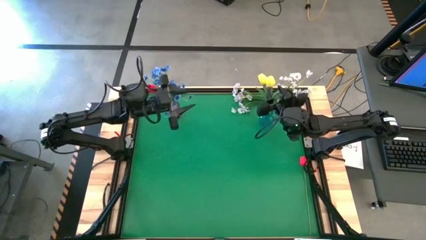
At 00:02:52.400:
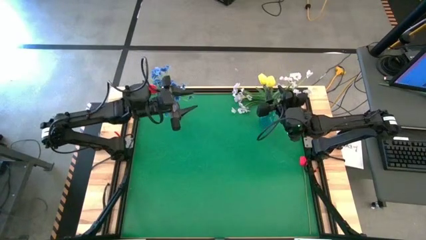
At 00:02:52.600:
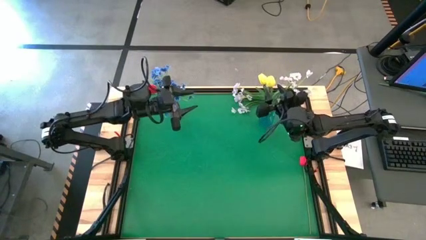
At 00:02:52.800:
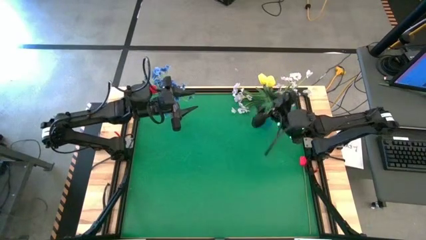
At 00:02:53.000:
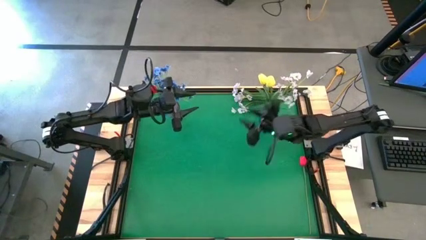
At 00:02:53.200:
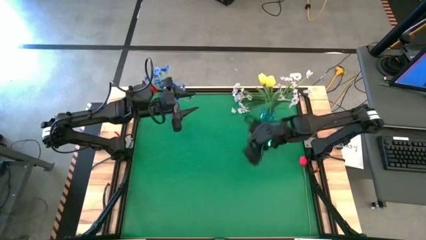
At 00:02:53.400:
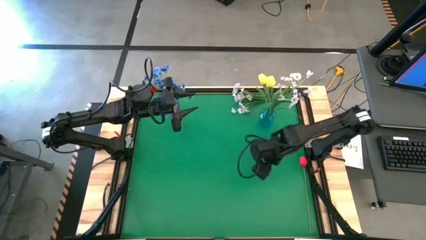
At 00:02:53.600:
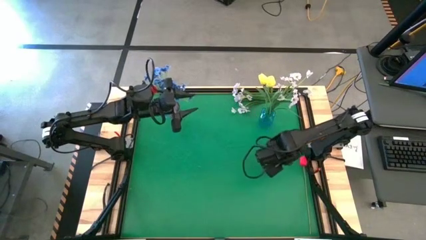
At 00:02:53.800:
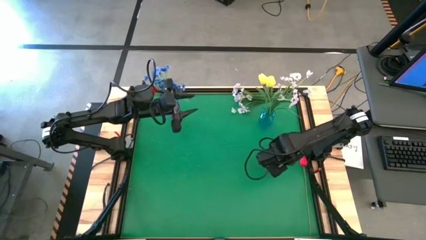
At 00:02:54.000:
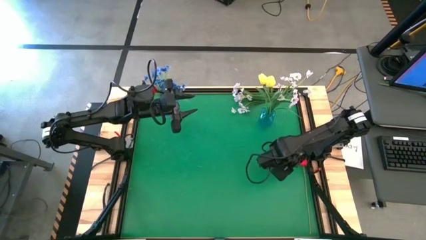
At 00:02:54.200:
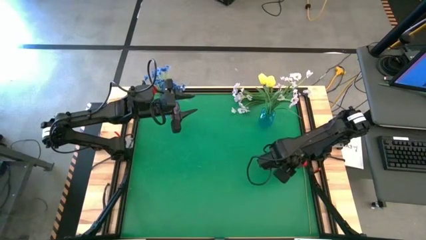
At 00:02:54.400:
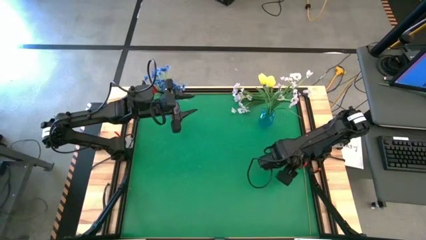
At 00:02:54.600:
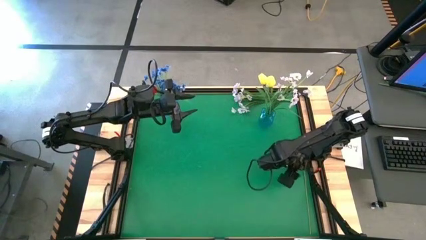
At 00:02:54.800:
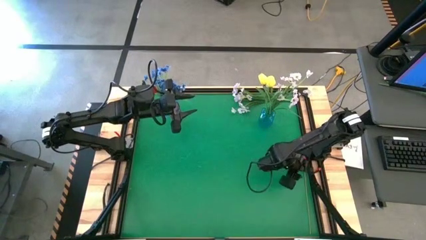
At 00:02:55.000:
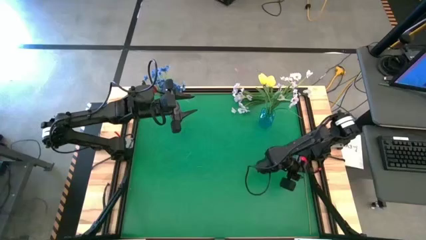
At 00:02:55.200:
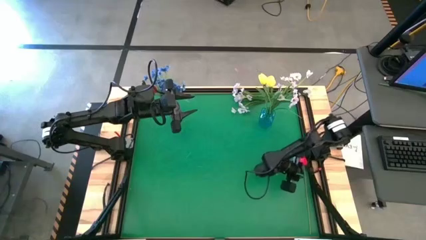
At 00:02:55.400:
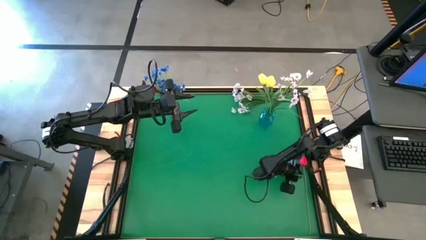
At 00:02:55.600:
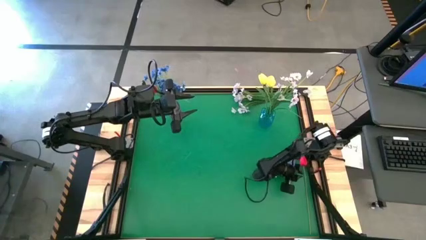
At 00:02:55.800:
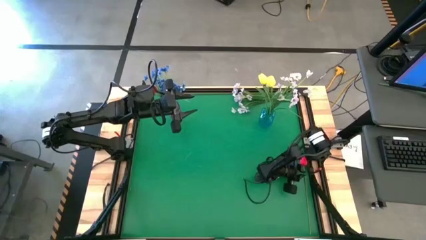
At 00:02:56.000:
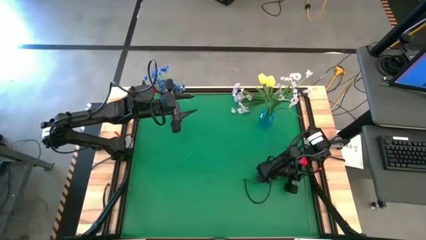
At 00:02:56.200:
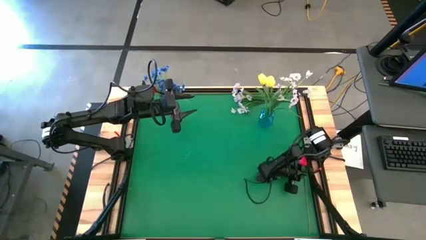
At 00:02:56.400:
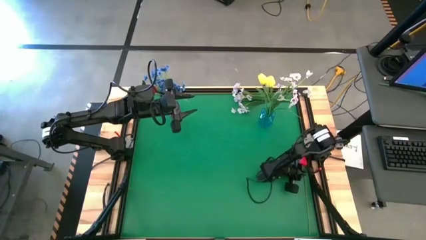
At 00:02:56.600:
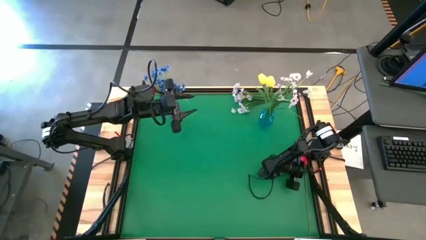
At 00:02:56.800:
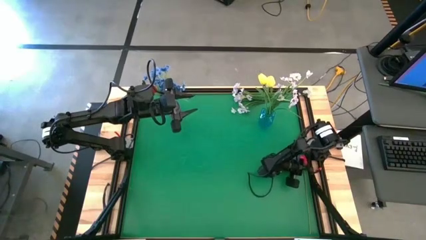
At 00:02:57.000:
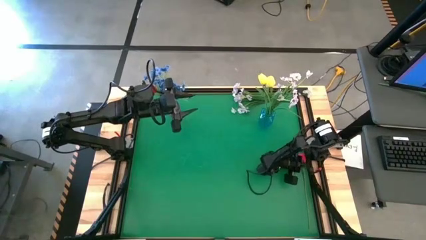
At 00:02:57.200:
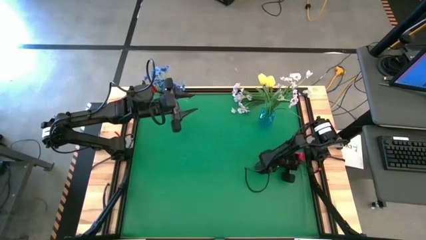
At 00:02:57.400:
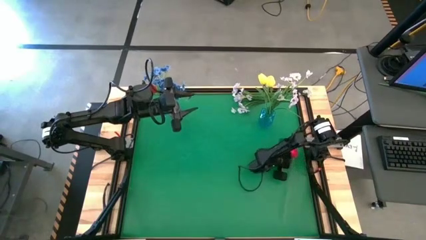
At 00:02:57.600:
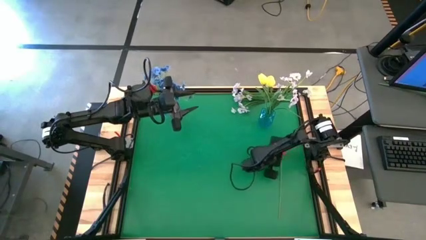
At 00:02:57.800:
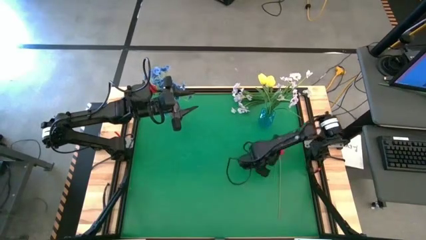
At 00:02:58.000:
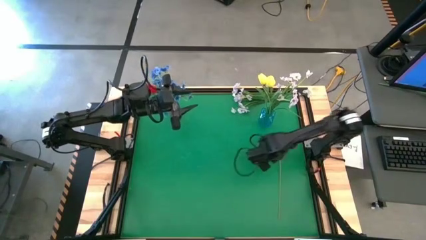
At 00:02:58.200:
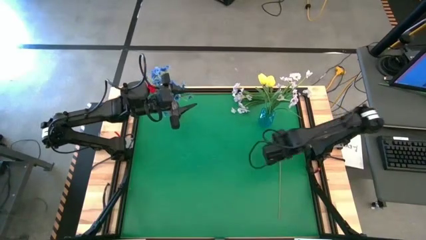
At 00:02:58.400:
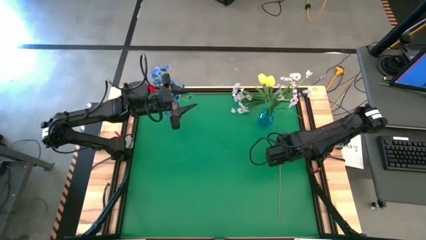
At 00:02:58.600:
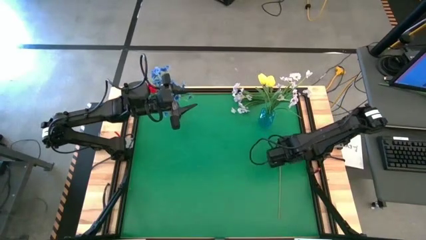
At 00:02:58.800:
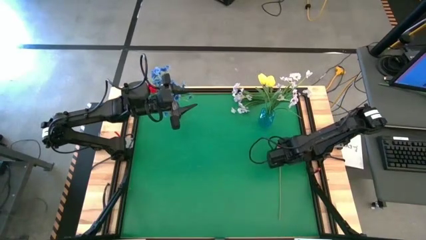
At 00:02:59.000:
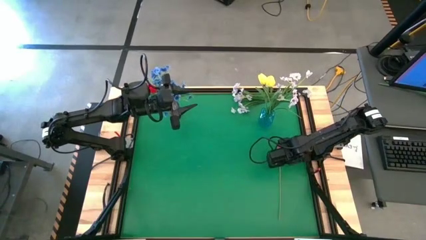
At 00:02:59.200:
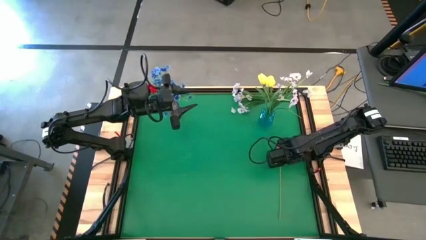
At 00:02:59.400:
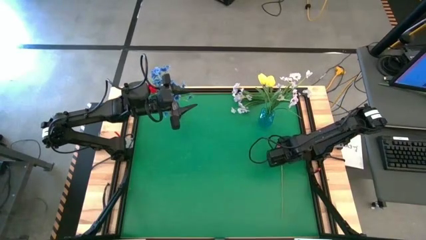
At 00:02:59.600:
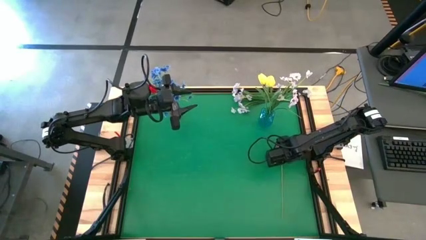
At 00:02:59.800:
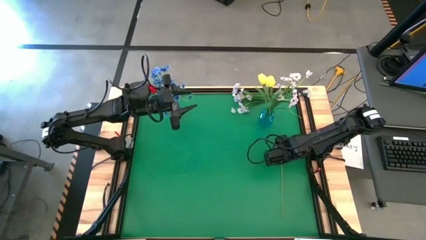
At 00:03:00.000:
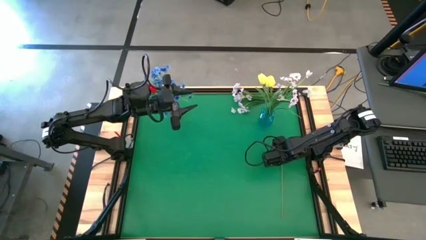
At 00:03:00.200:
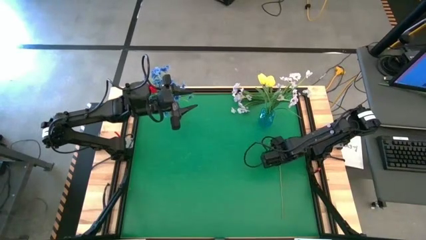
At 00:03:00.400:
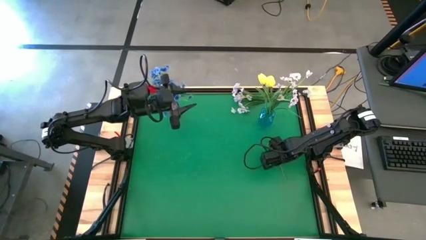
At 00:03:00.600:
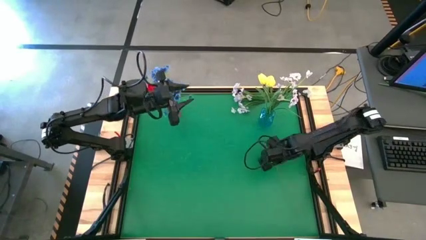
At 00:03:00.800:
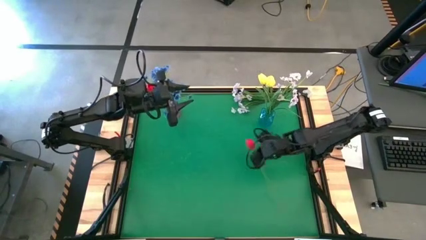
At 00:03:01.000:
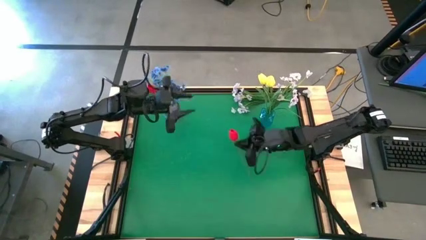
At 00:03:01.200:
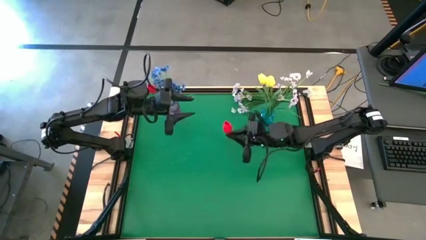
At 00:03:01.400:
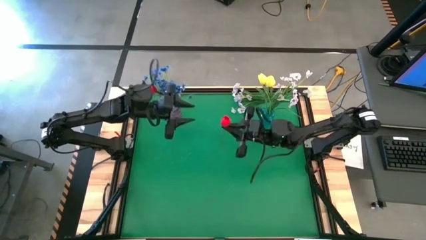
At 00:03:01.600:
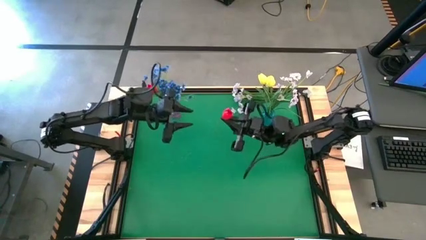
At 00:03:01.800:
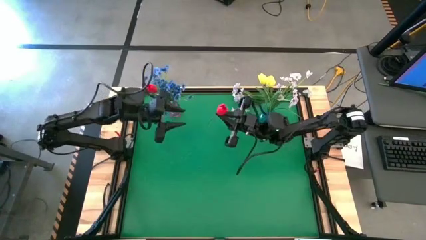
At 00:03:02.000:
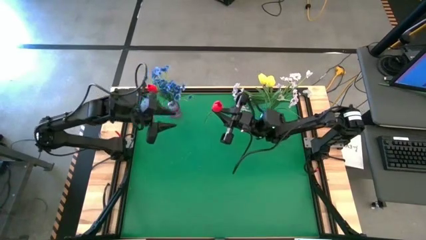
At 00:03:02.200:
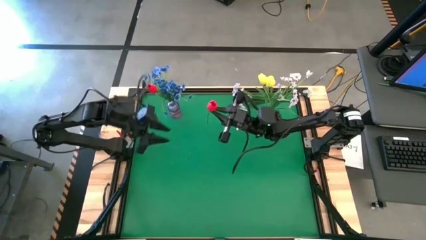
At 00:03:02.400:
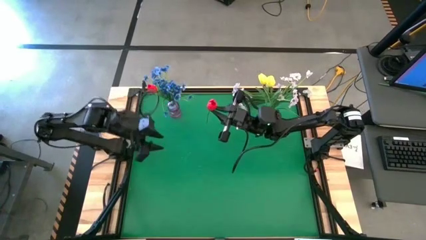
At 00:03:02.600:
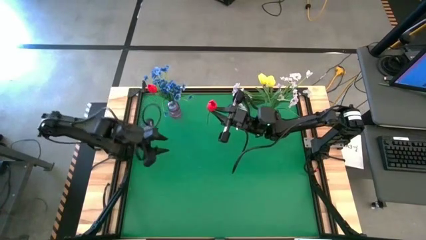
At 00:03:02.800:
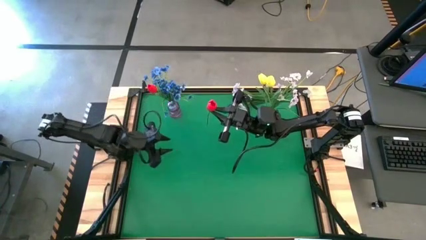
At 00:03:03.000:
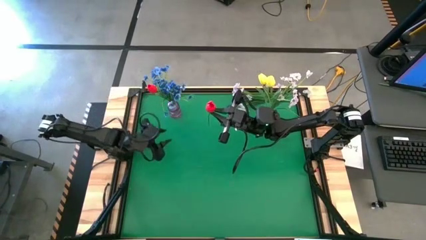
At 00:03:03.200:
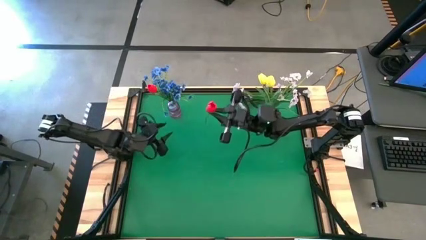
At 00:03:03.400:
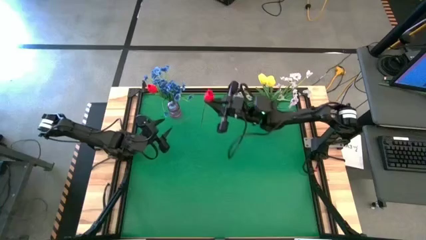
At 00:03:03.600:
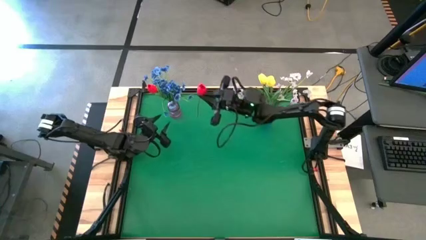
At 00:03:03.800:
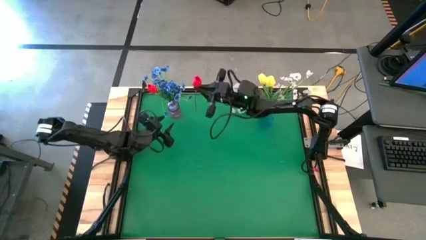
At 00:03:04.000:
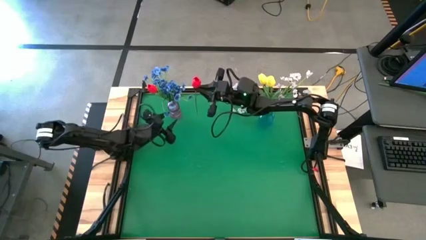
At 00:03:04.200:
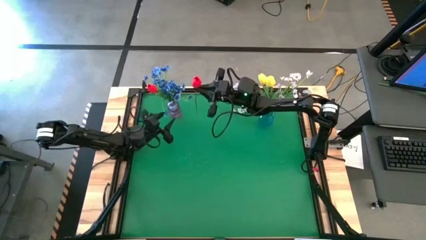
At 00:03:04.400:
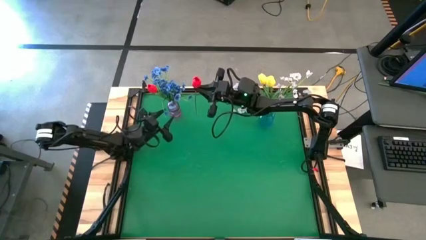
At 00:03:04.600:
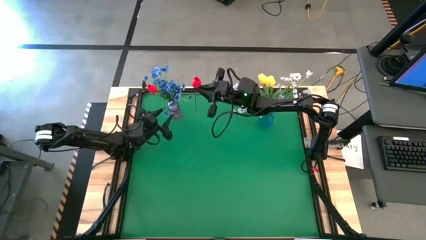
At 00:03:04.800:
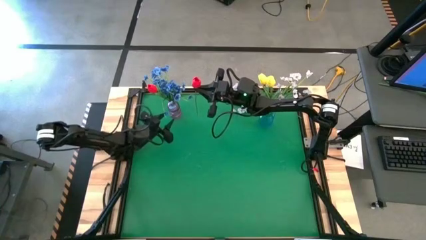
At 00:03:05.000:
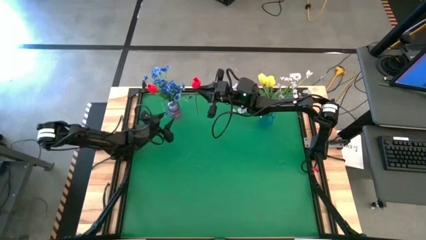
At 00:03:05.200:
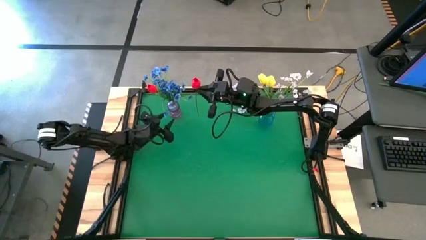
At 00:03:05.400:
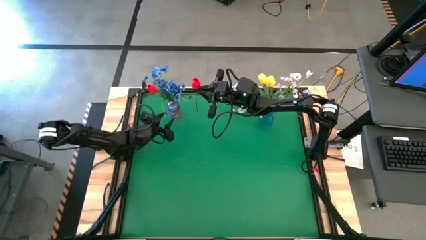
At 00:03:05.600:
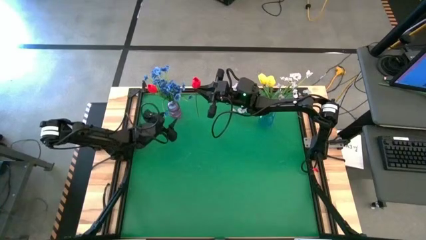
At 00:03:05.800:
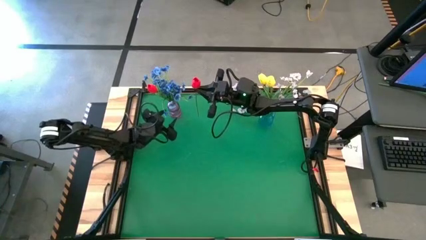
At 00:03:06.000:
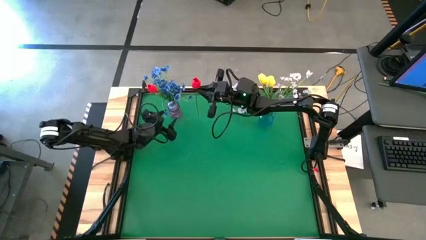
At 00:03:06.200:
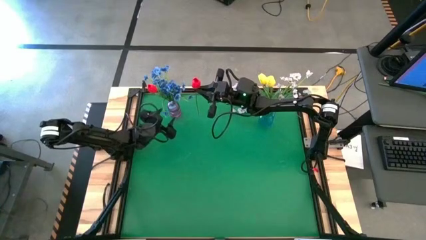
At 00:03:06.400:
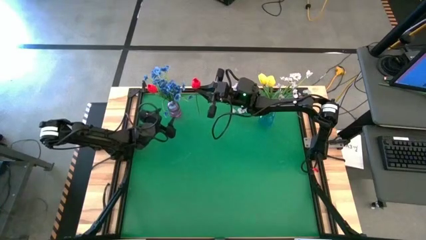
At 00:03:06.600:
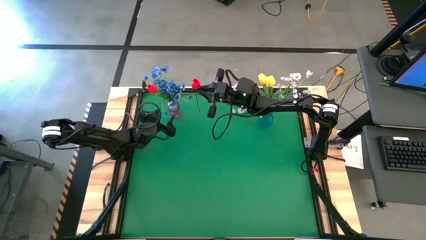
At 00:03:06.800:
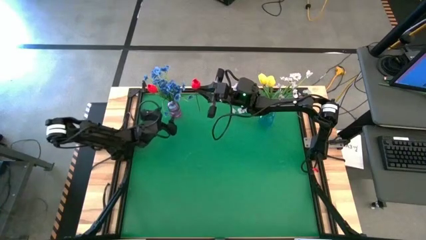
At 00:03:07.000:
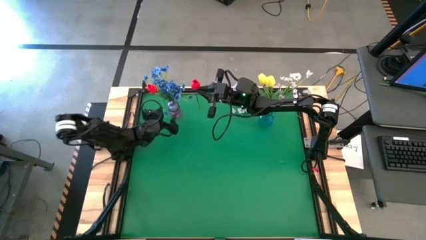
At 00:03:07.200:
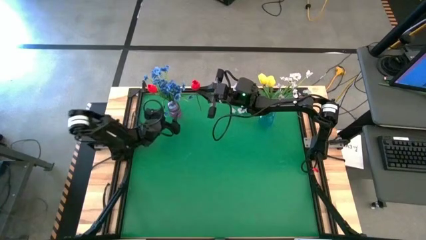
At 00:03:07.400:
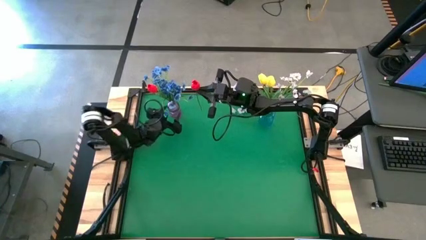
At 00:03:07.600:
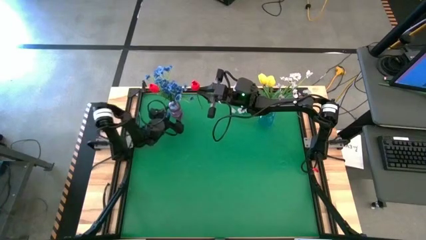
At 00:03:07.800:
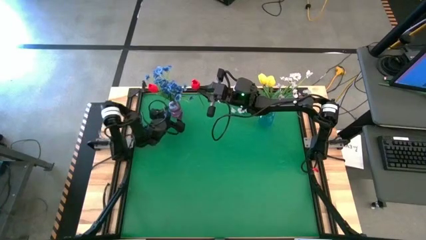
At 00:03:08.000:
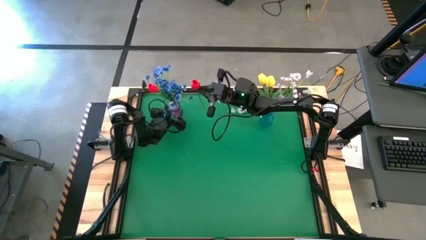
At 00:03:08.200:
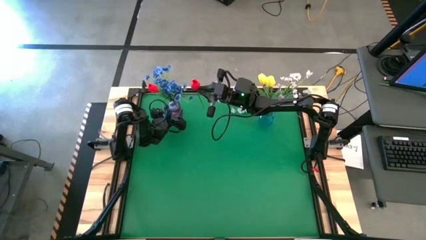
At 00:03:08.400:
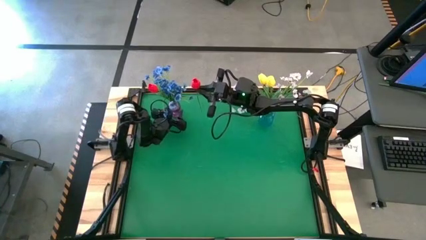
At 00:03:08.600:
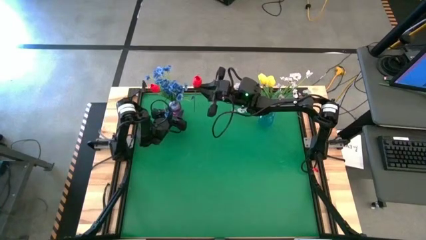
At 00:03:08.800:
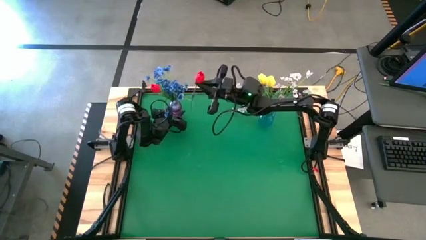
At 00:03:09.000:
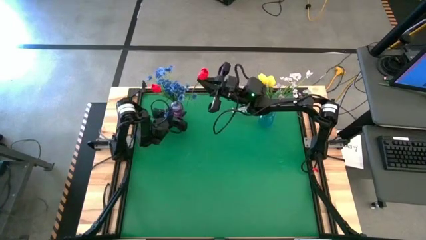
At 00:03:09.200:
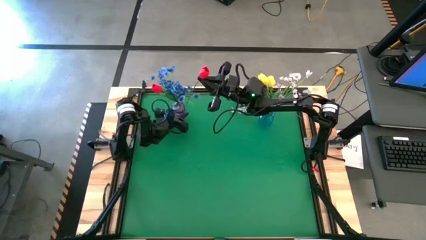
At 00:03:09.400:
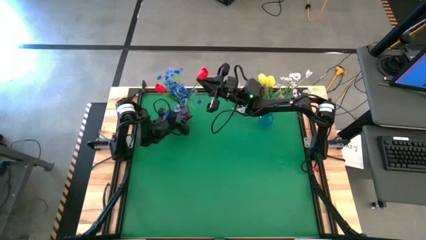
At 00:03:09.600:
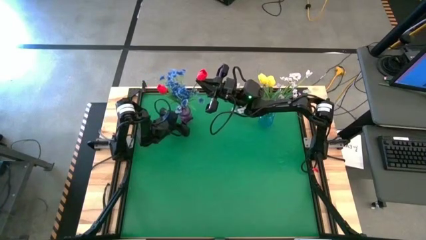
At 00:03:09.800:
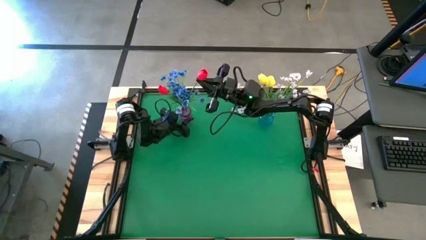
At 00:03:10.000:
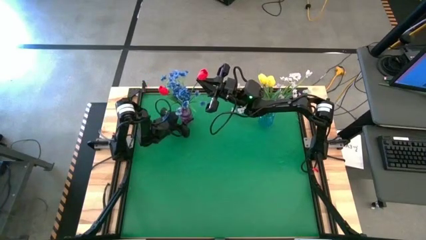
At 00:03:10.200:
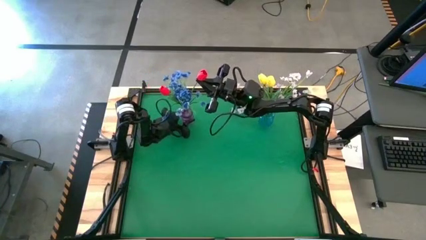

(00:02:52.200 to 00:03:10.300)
Task: Sort flowers into vase by color
Put the red tulip into the purple vase
